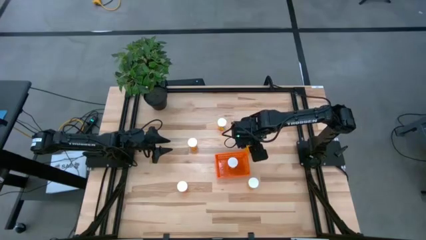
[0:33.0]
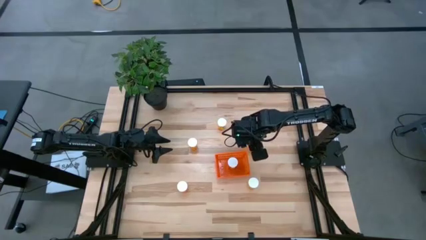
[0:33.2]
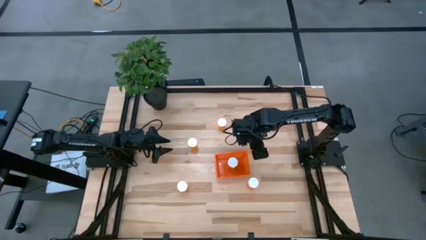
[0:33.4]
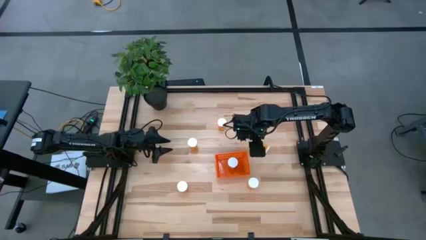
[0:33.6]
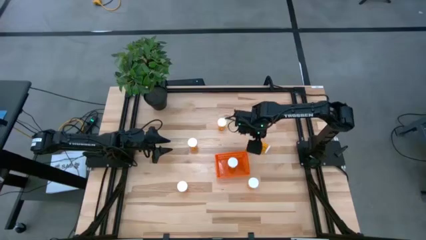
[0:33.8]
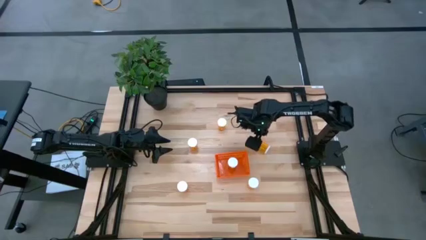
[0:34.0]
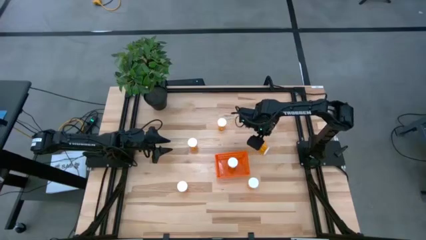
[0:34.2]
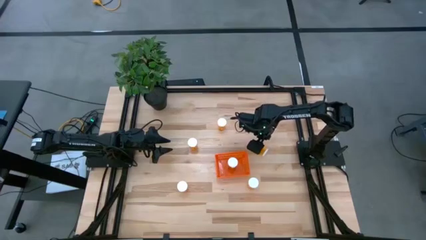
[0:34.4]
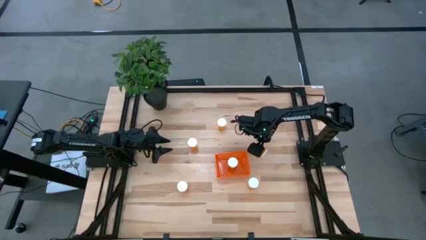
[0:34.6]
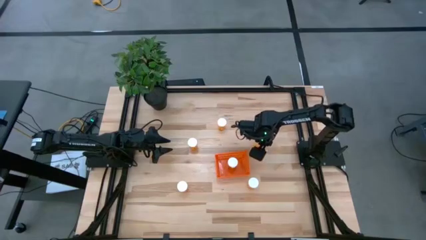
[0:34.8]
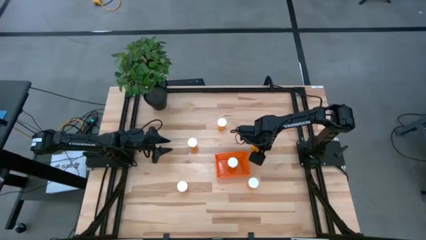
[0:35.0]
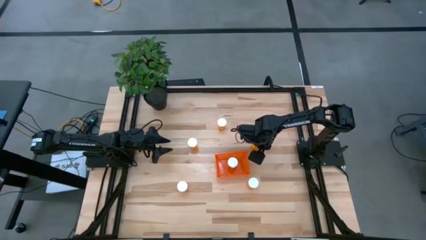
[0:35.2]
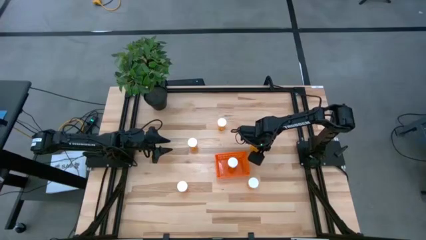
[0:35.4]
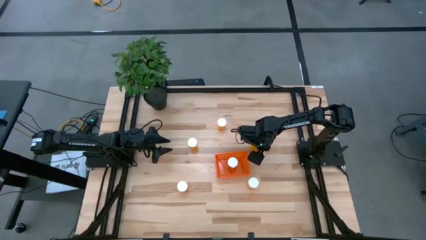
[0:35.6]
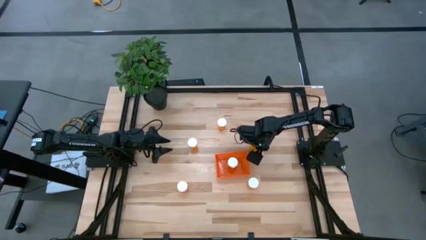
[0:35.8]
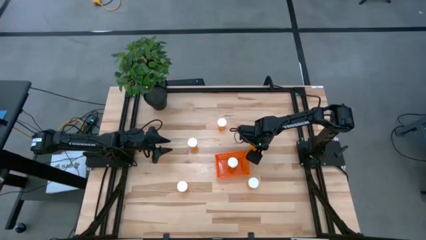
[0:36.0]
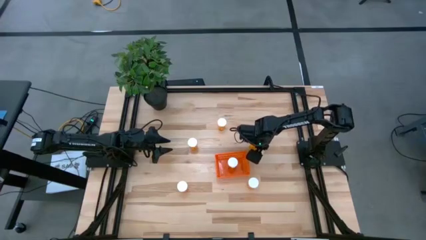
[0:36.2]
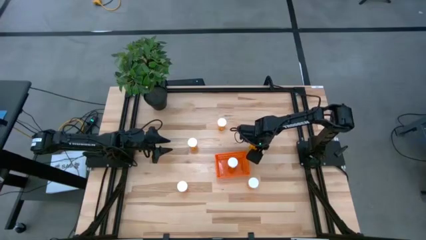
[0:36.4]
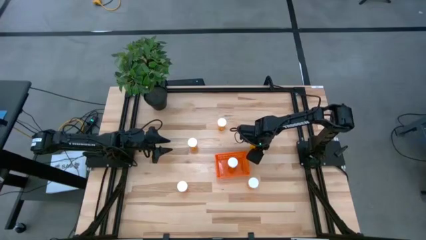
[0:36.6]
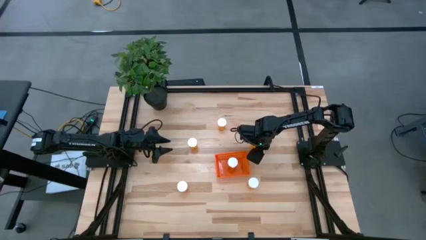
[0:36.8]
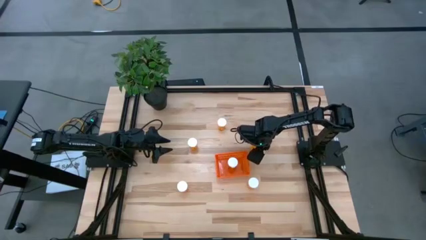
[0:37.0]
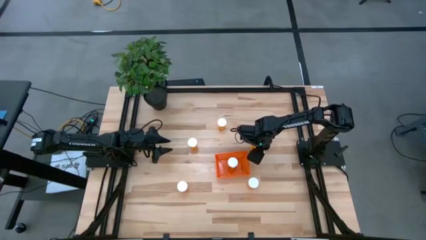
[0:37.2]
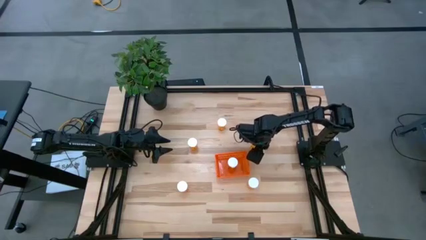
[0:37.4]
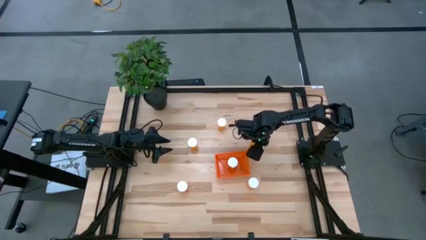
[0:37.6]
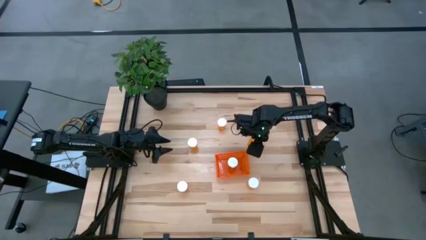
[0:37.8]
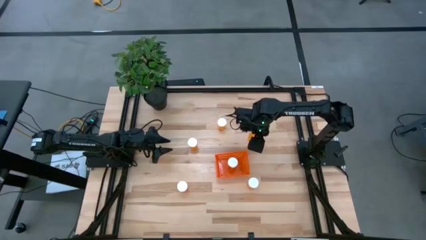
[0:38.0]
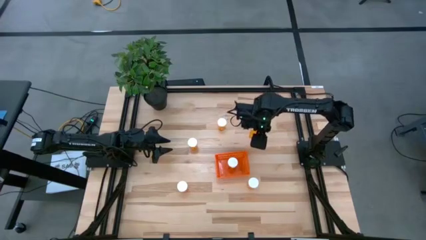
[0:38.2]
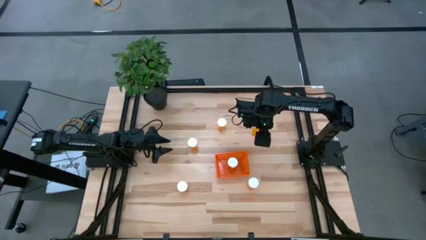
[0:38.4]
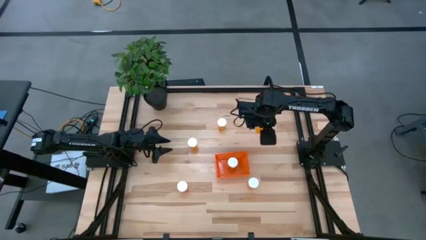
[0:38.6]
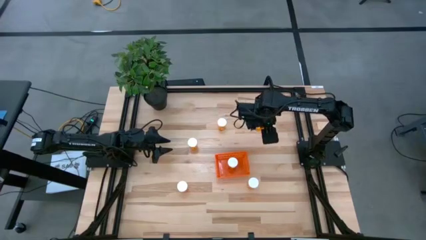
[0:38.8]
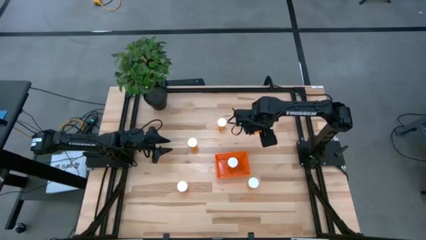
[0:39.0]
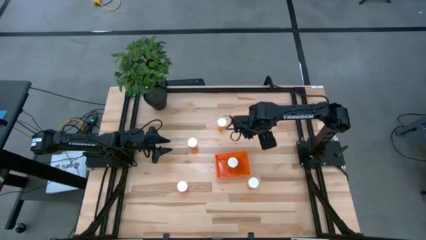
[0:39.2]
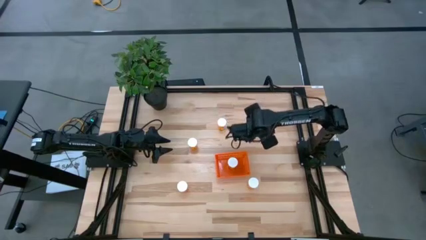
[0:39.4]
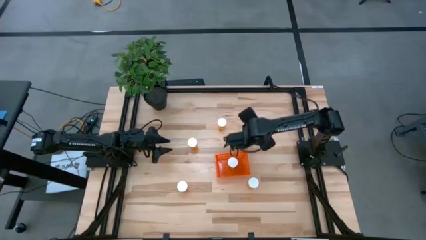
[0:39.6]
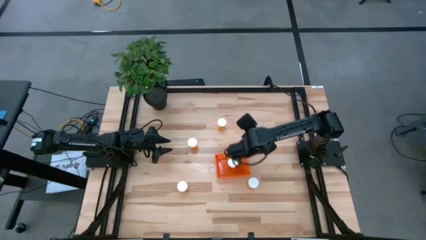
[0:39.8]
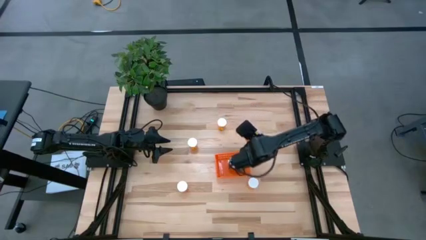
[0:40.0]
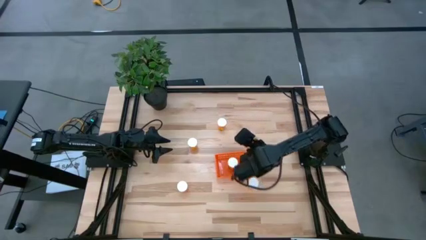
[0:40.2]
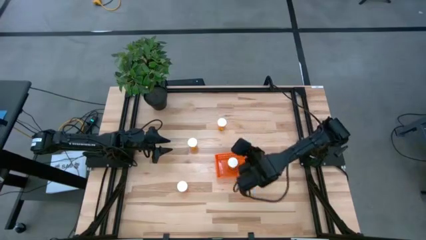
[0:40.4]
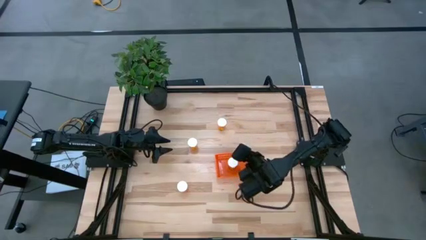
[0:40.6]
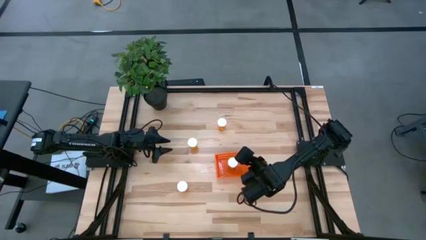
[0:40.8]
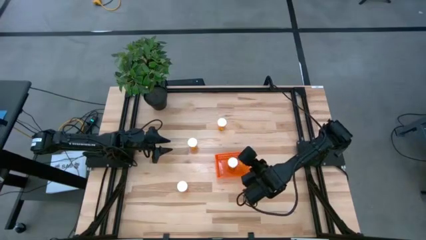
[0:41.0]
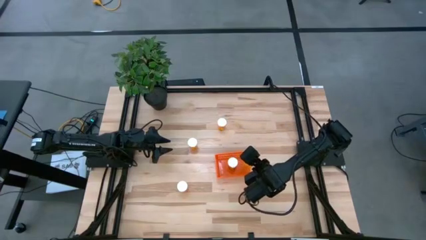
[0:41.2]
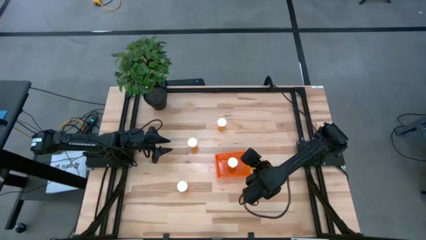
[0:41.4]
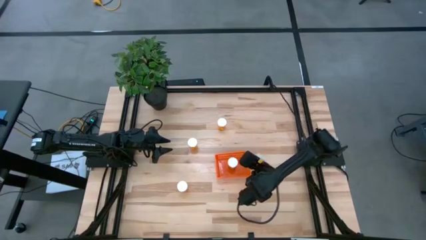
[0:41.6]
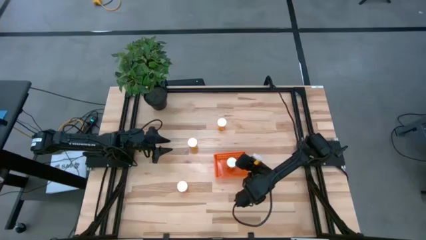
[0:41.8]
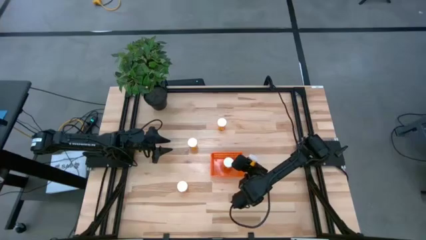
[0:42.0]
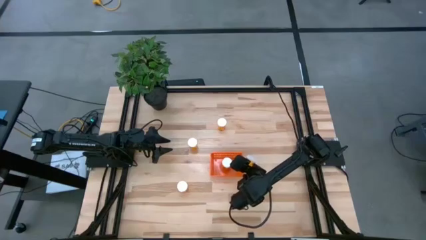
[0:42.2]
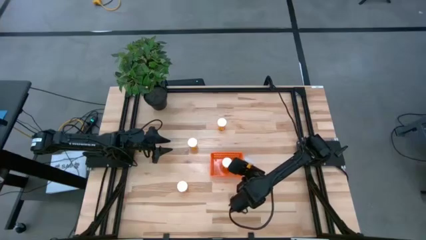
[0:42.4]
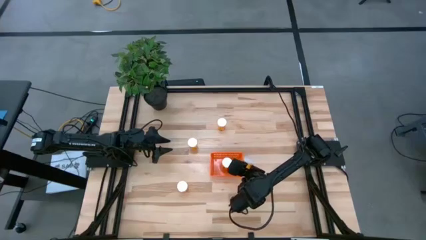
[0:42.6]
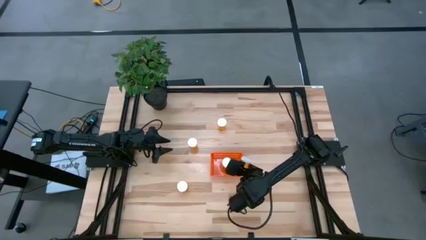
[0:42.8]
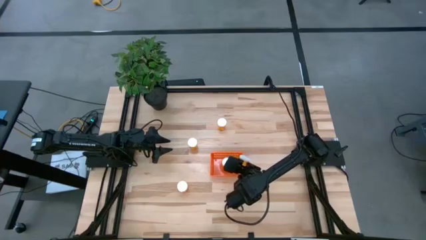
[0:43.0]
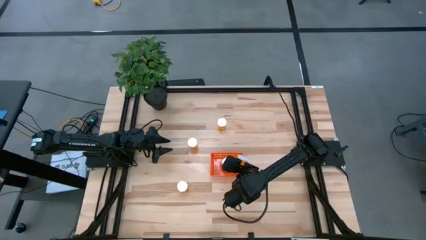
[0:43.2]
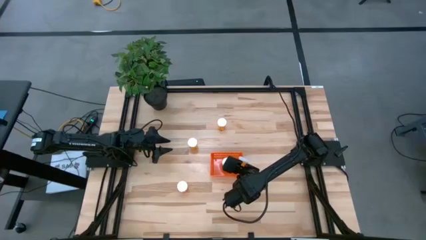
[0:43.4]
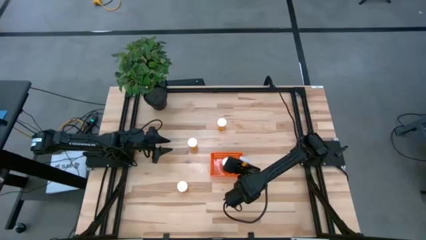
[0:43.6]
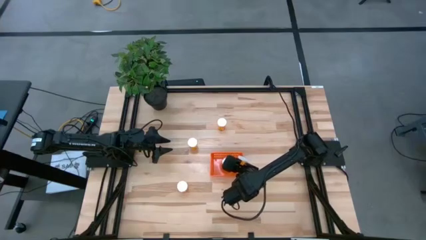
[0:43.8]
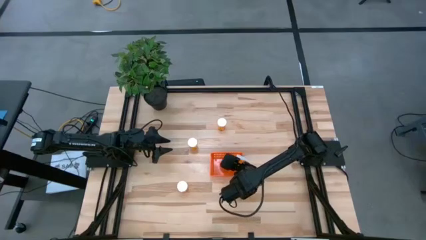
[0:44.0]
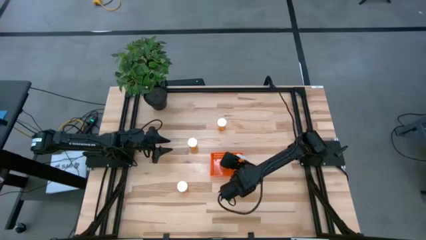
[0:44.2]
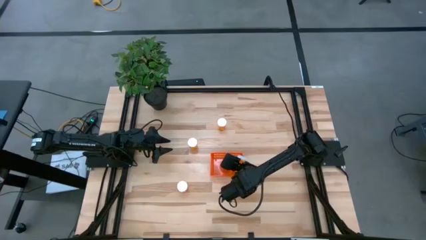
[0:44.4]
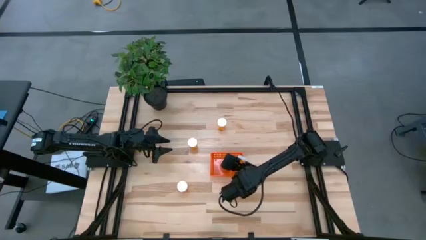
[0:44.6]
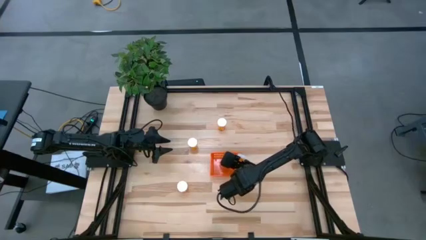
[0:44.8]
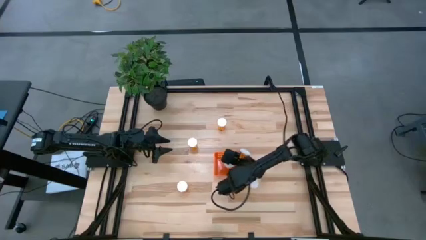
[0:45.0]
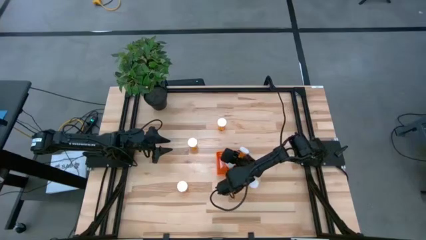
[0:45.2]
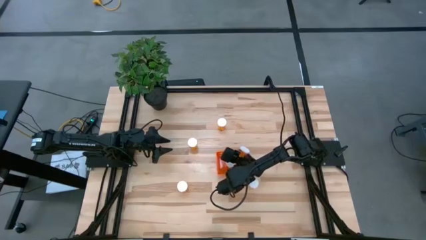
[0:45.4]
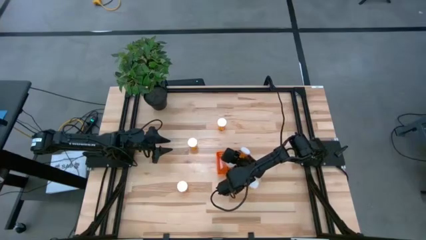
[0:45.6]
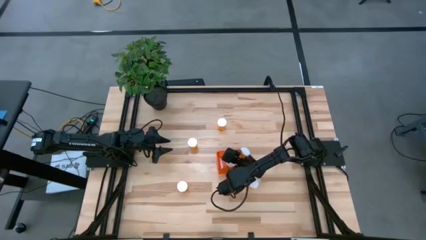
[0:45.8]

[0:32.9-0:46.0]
Task: Pick and place pill bottles into a basket
Put the orange pill bottle into the orange bin

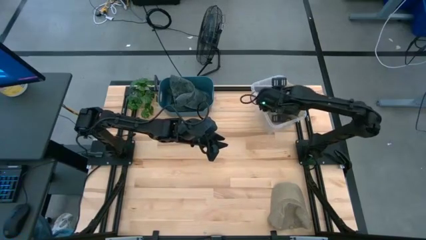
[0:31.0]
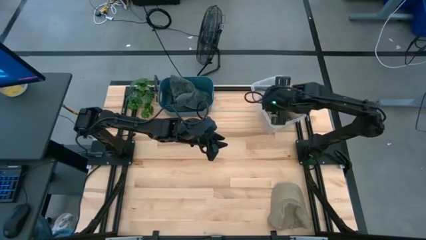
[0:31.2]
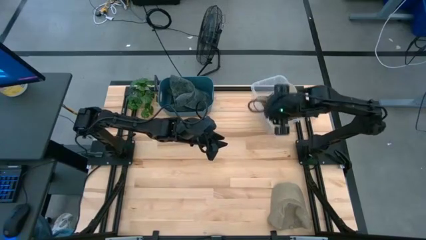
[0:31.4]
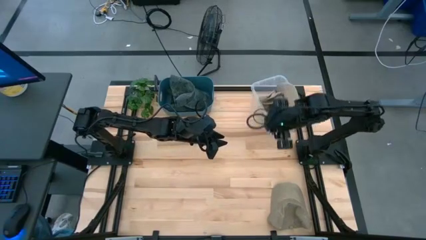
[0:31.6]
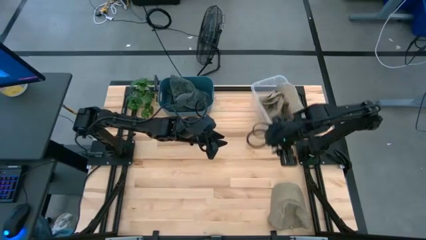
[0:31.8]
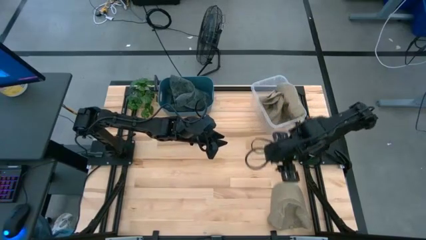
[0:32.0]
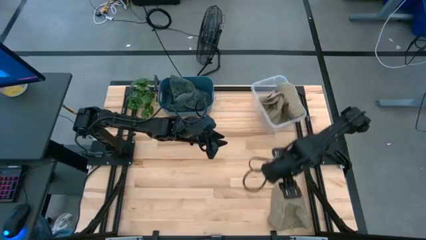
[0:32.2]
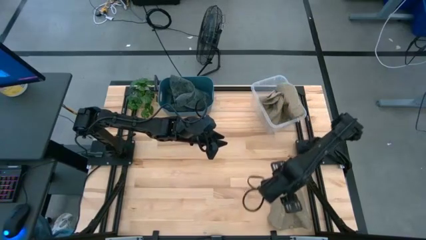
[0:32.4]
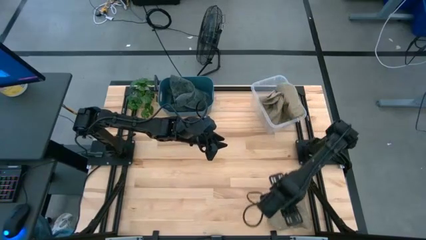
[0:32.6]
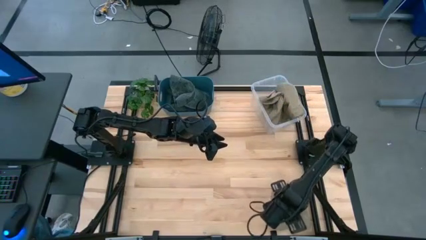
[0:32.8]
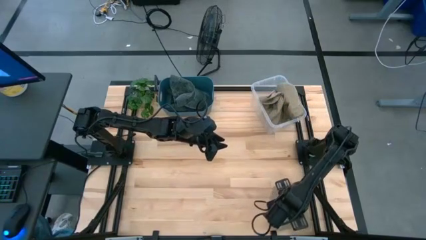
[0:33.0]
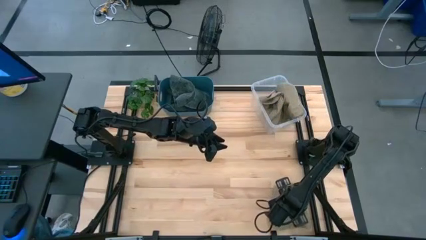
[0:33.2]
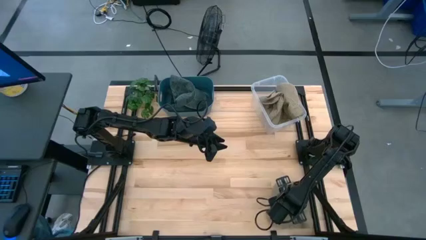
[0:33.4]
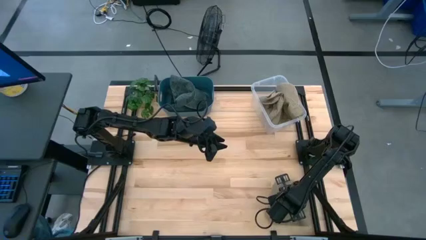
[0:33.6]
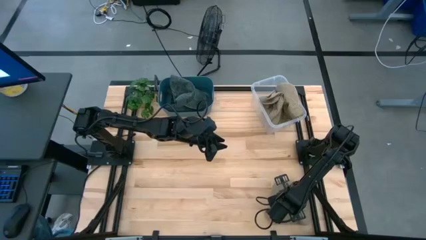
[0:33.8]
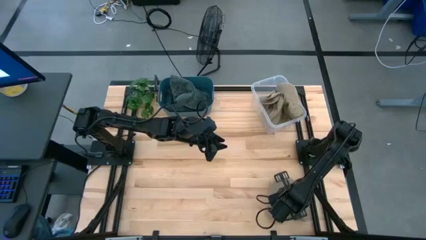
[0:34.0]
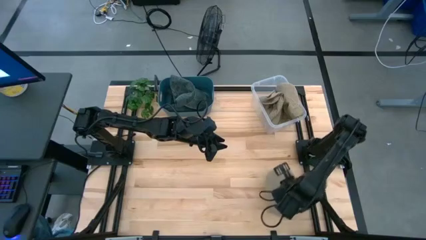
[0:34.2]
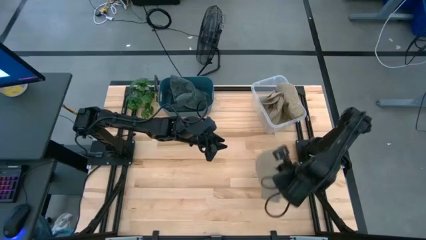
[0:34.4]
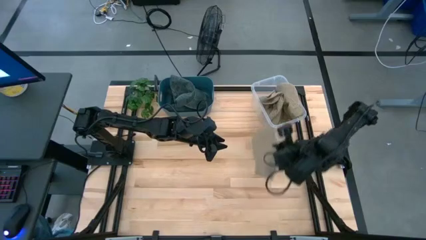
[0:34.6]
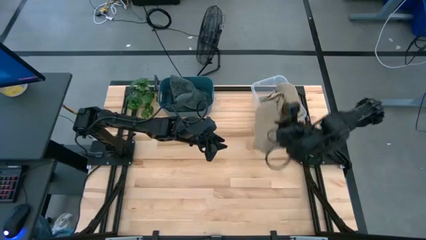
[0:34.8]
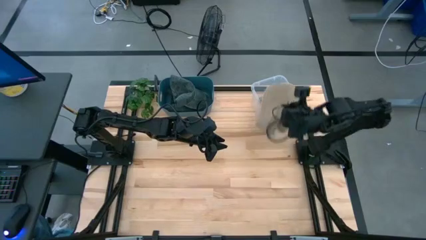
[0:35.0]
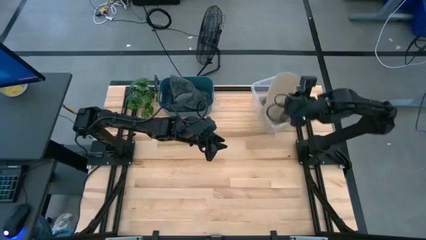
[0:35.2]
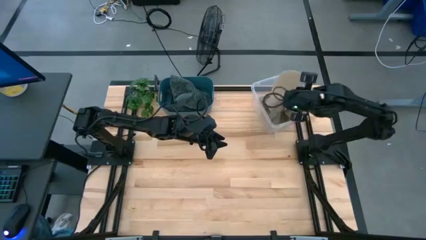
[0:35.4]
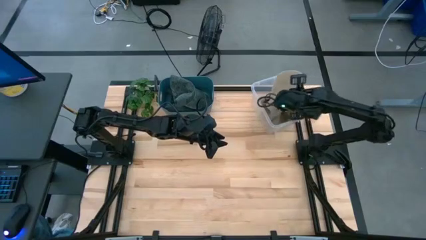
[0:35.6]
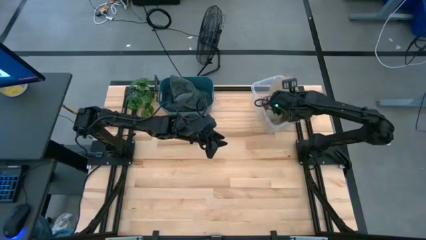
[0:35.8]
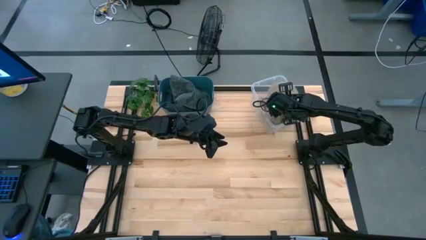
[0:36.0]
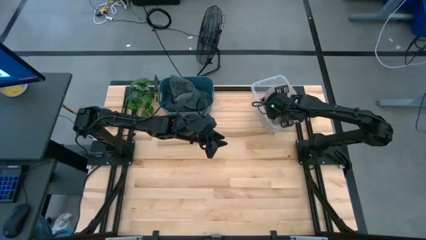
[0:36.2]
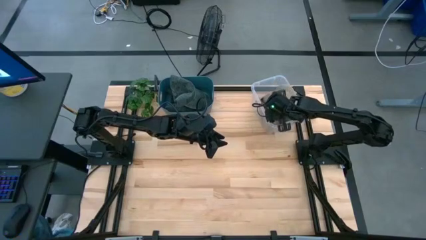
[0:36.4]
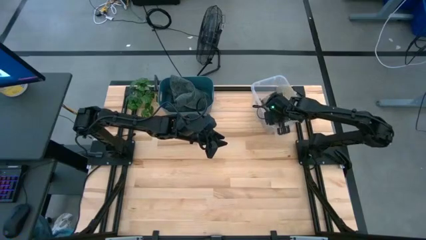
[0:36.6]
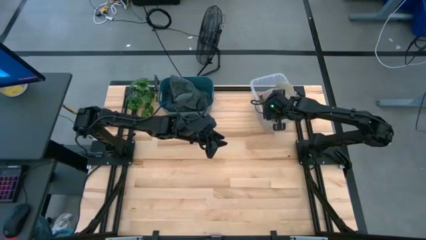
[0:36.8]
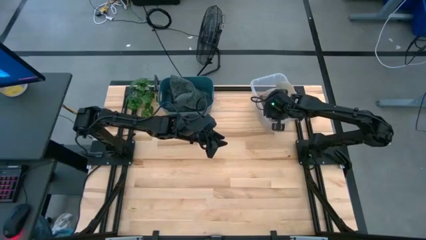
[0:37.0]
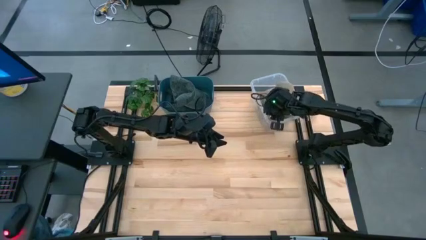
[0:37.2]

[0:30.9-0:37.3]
Task: Pick & Place hat
Put the brown cap into the transparent bin
